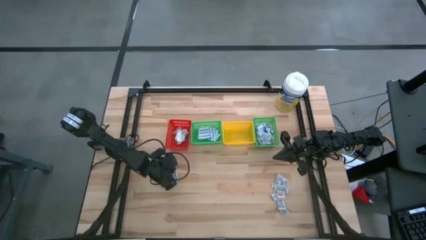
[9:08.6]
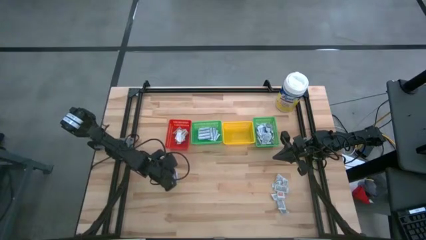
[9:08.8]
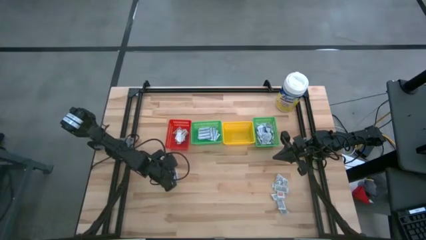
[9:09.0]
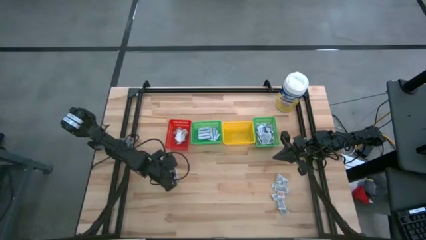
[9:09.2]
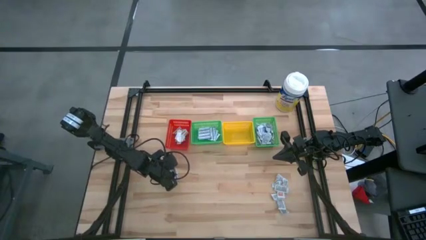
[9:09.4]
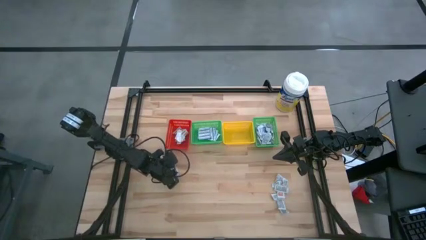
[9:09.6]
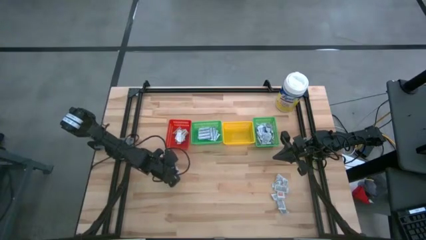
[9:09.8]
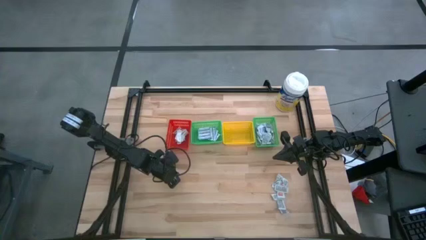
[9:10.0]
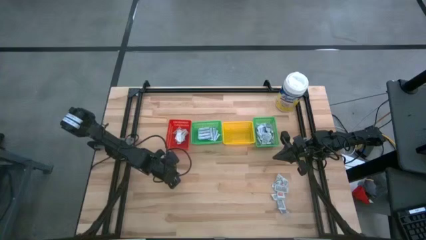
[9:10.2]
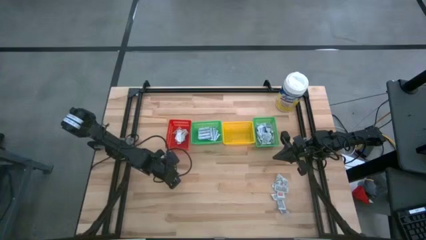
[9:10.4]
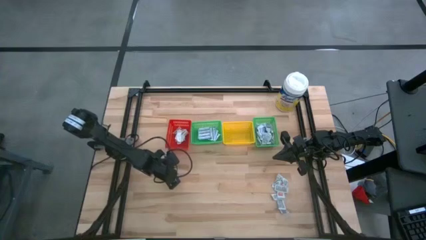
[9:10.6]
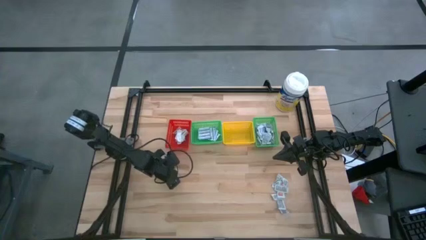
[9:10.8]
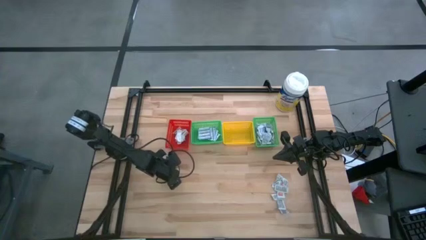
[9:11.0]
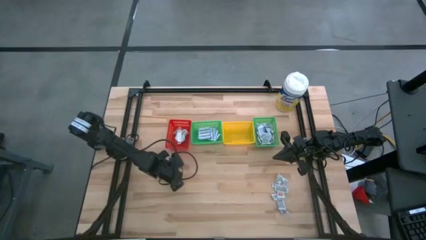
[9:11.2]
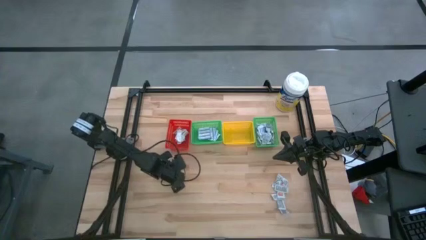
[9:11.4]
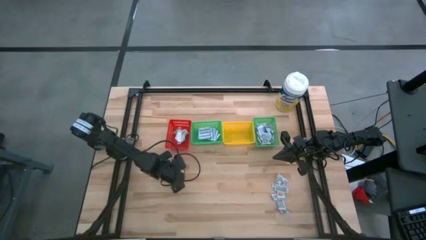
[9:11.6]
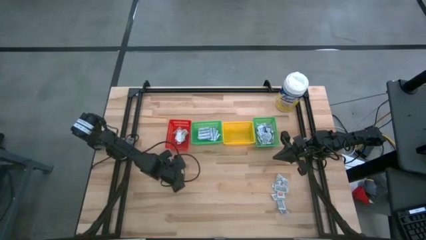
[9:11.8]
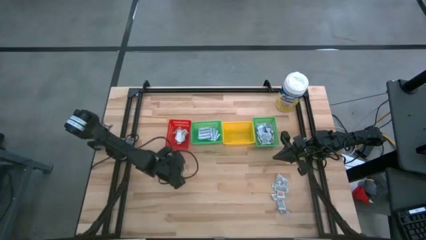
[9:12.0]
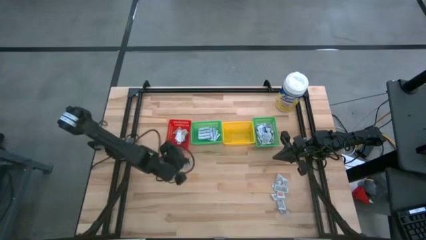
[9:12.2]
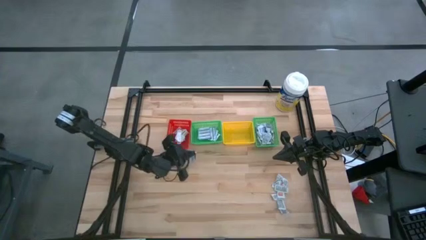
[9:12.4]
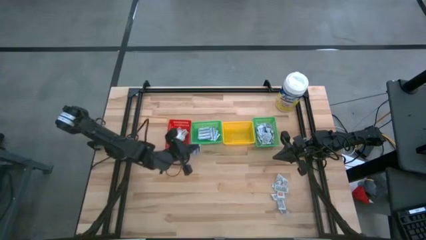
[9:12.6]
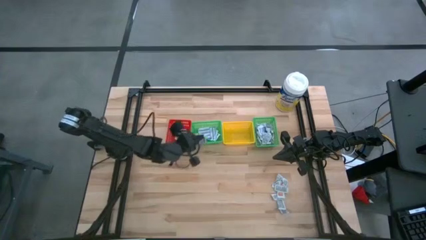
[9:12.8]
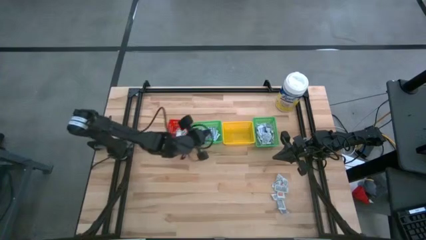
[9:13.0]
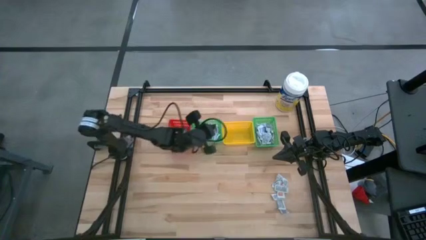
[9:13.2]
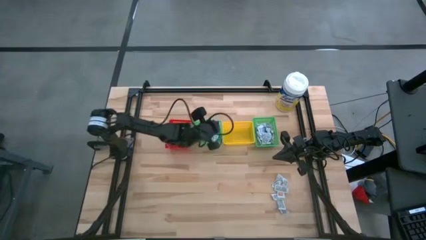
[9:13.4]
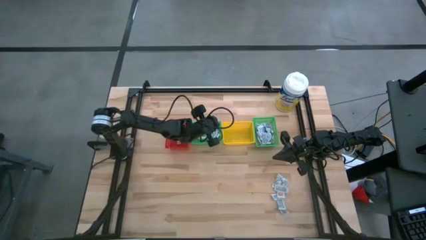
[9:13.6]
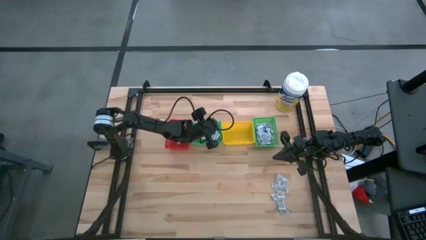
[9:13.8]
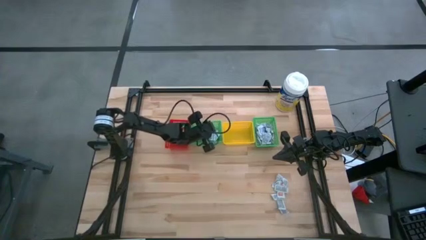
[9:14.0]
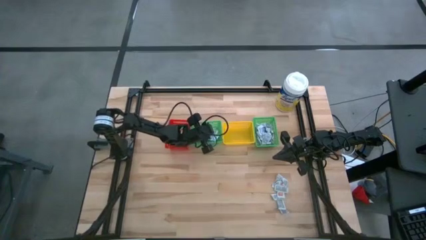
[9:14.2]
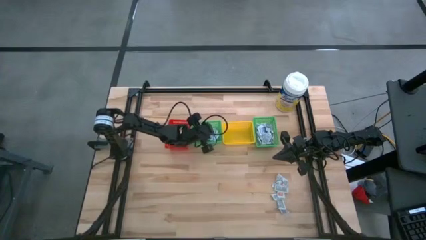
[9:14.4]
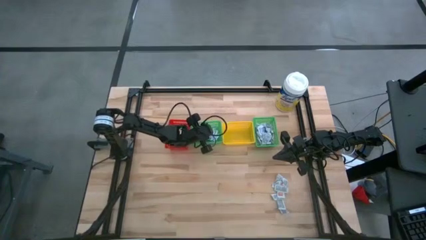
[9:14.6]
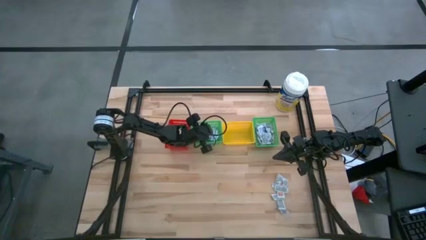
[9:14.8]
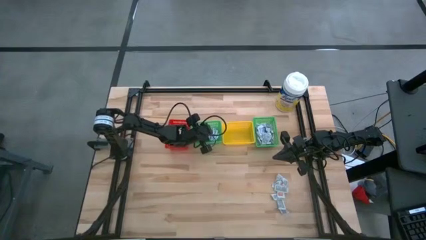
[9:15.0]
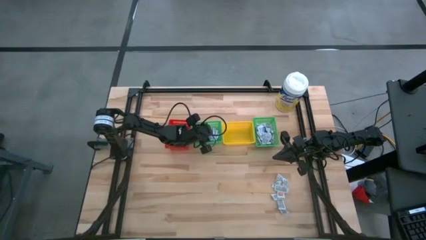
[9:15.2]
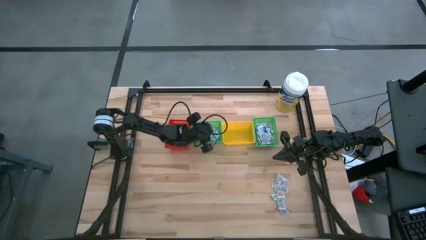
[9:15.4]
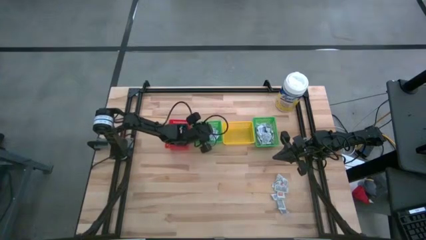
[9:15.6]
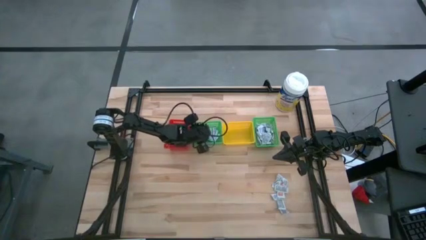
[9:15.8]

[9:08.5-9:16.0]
Task: Pick & Place First Aid Supplies
Put the blue bandage into the left green bin

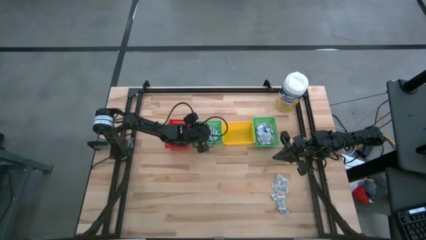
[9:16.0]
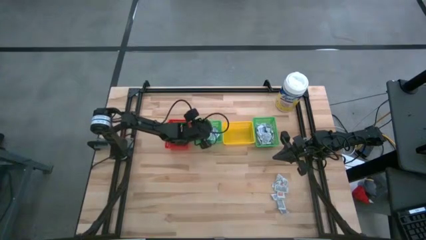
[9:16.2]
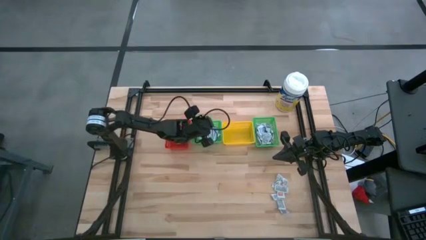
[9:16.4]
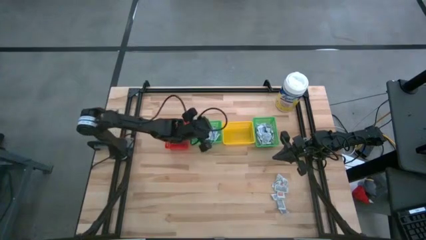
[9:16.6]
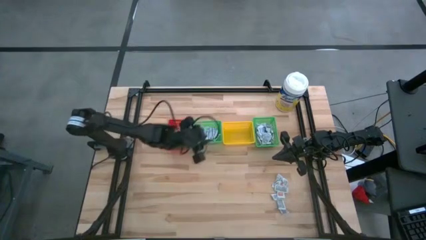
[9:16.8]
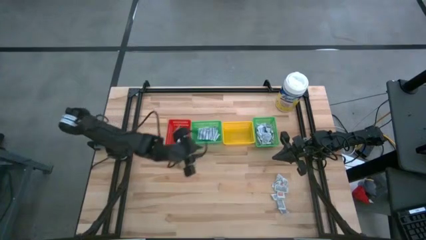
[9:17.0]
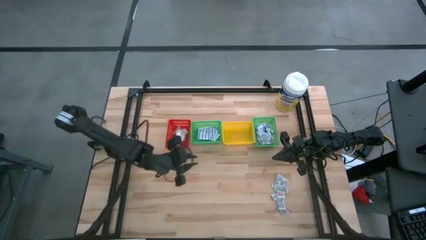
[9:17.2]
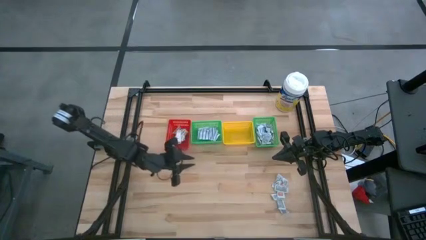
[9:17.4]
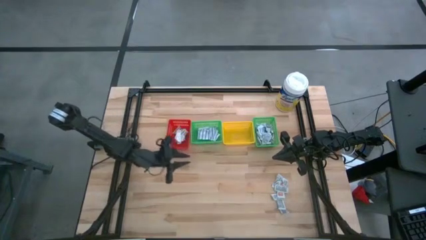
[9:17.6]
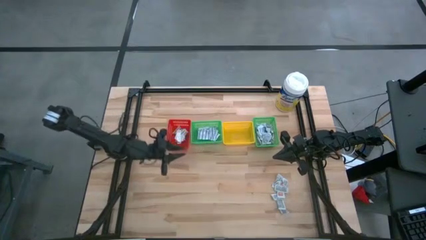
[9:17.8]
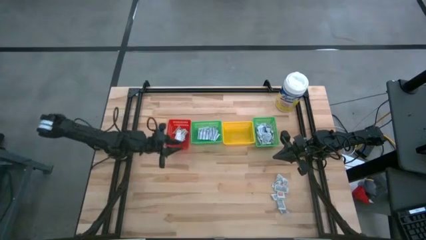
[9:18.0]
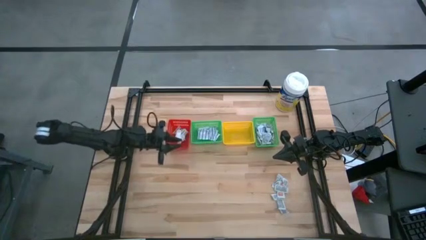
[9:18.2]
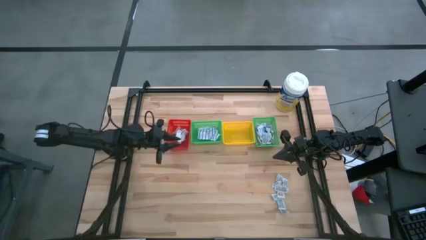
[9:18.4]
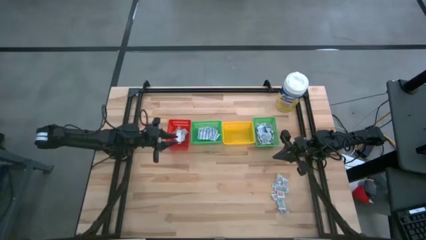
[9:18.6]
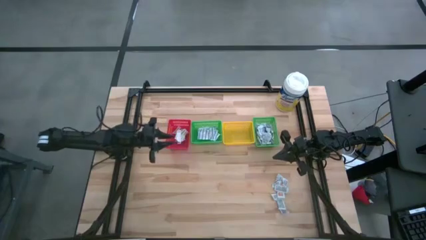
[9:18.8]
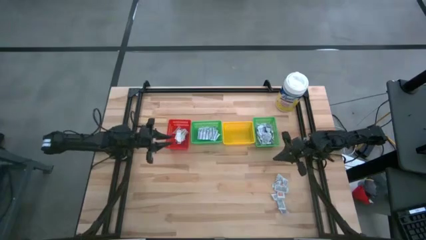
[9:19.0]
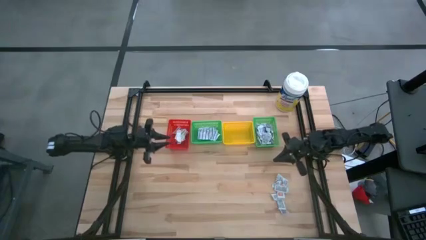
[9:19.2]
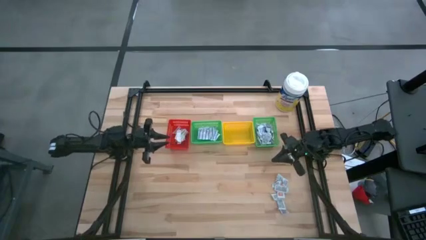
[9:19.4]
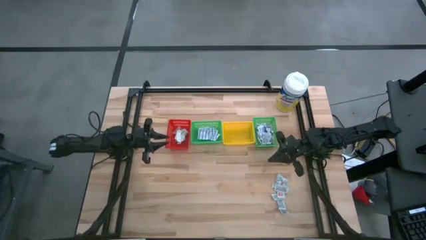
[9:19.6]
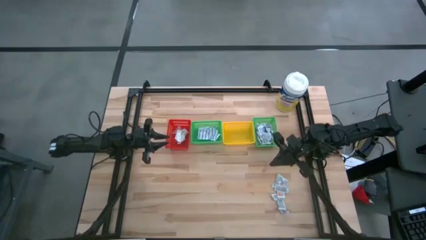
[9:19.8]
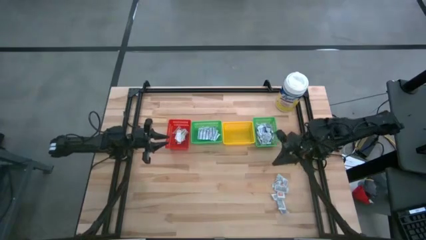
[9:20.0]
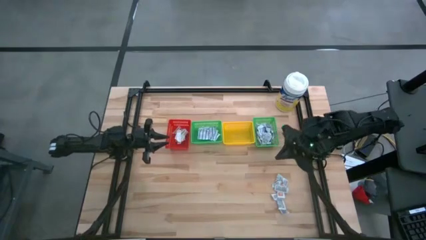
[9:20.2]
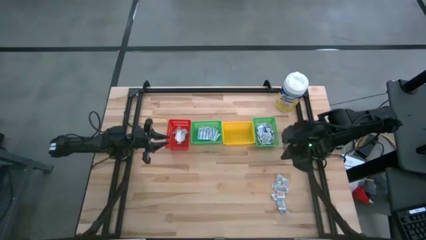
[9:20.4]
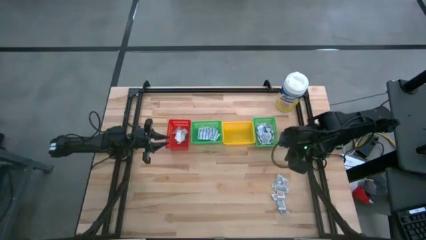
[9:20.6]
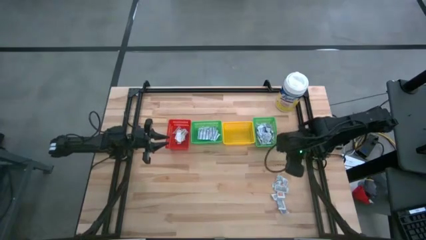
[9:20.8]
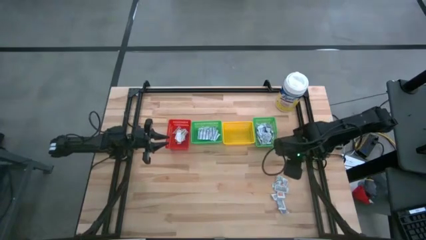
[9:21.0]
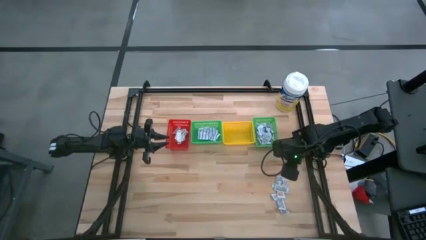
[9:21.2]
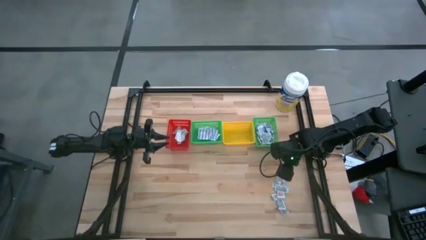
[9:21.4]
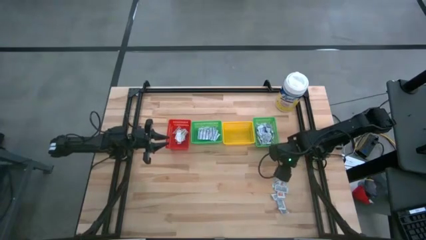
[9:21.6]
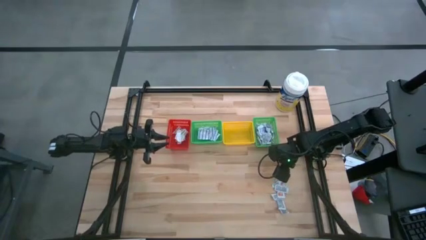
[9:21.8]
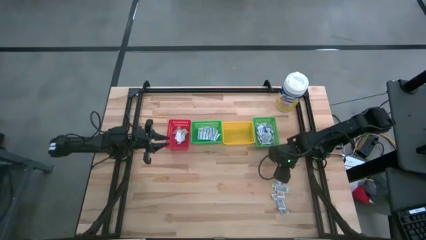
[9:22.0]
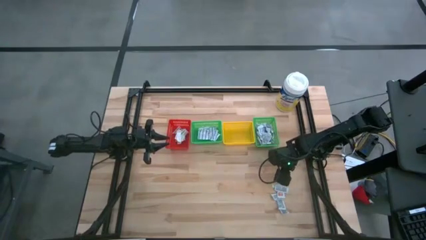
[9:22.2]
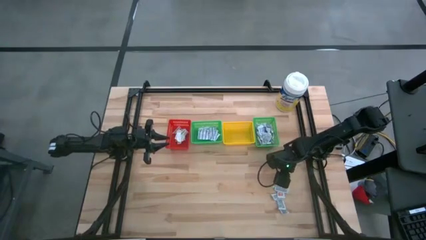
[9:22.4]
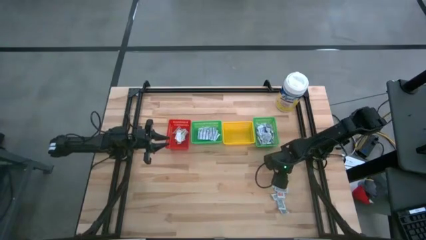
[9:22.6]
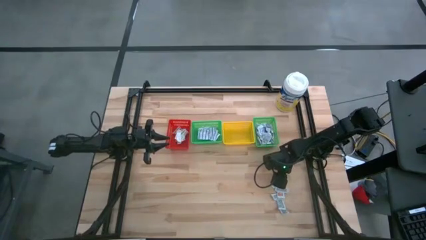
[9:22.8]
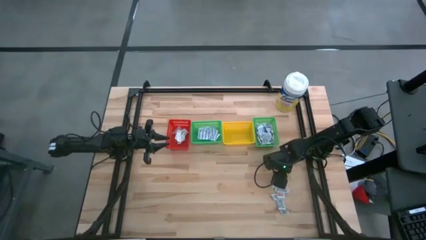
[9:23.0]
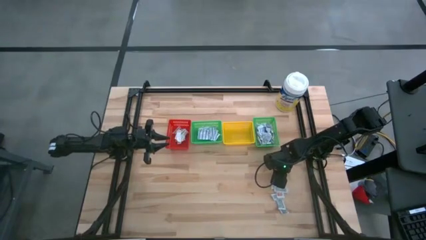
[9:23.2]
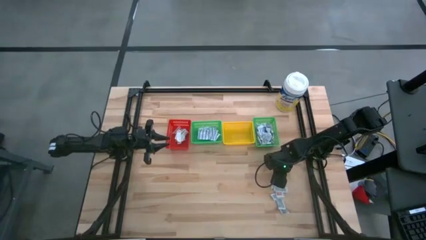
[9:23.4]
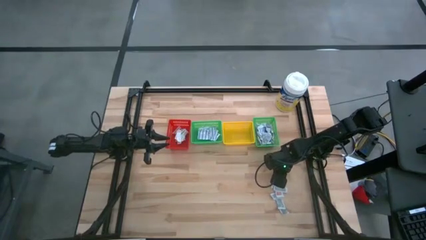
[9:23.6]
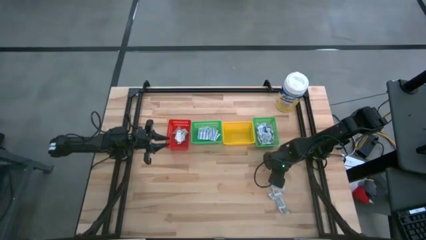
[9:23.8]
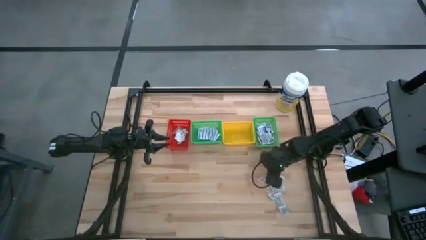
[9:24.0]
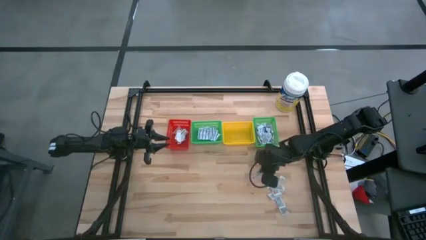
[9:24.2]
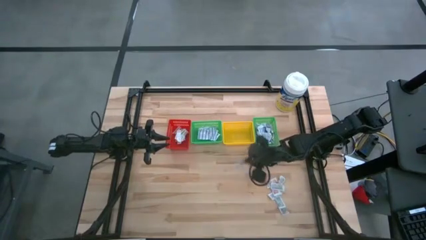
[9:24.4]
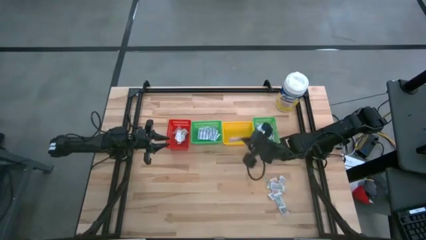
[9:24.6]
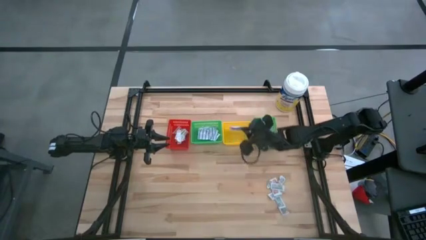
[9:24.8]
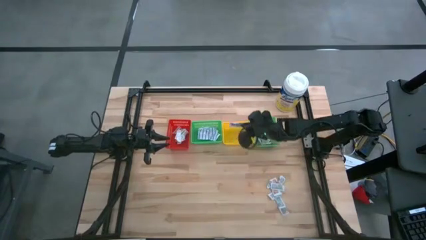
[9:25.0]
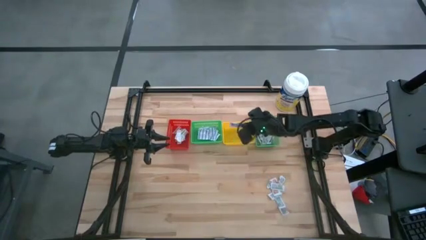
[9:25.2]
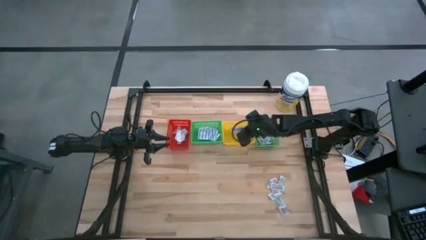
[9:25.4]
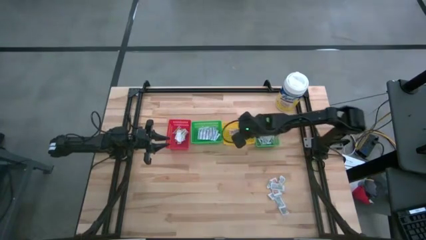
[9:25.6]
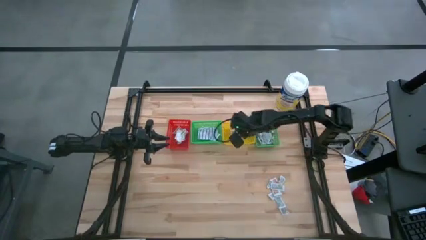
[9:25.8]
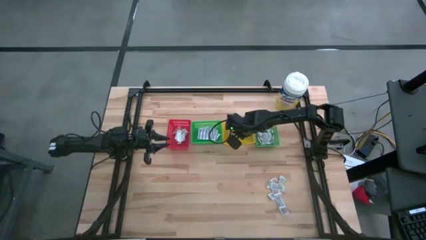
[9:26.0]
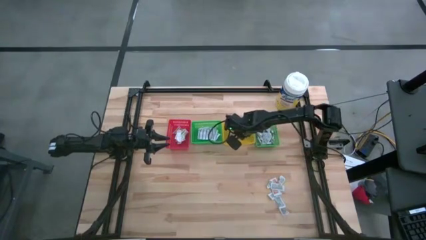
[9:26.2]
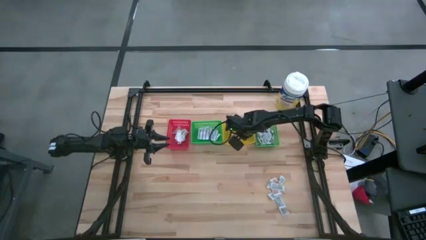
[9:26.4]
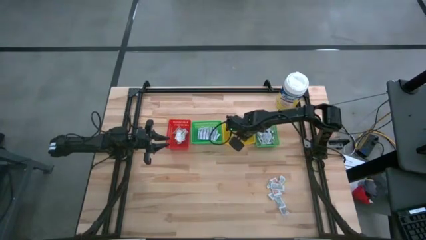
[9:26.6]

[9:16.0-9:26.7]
Put the orange ointment pack into the yellow bin
